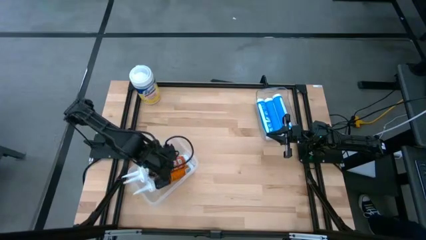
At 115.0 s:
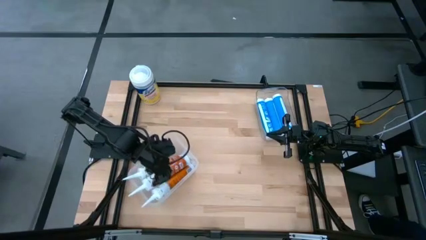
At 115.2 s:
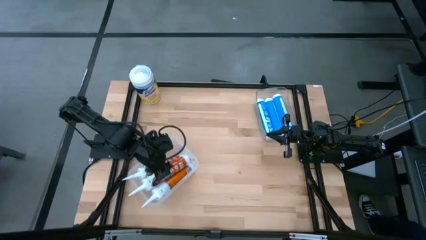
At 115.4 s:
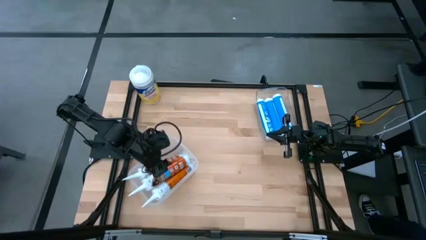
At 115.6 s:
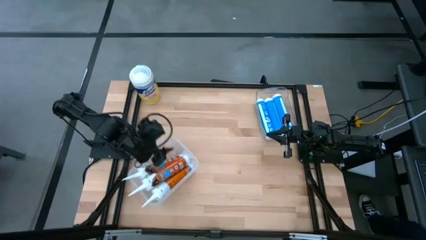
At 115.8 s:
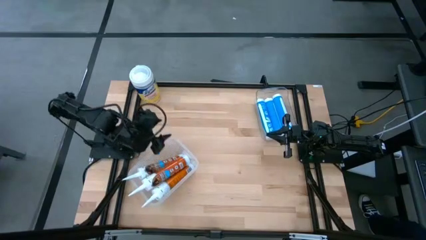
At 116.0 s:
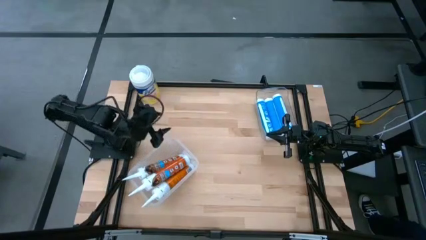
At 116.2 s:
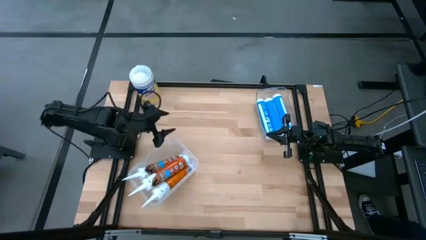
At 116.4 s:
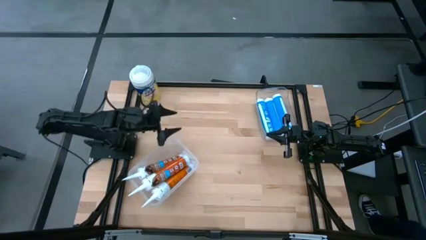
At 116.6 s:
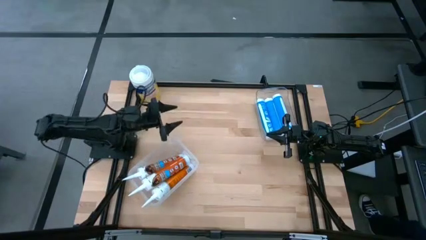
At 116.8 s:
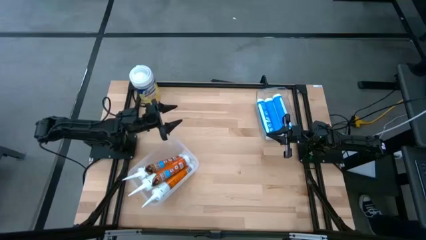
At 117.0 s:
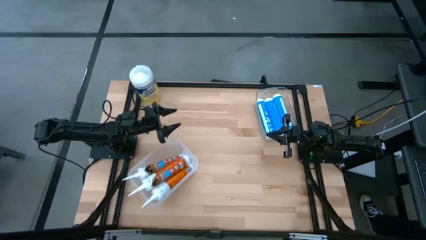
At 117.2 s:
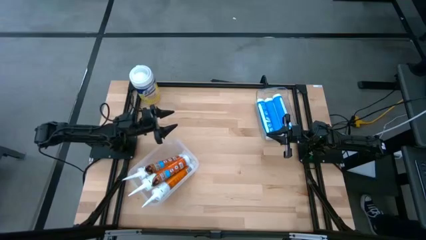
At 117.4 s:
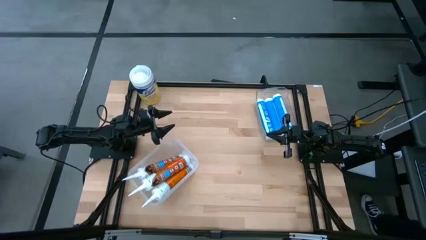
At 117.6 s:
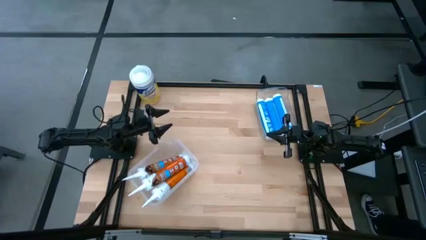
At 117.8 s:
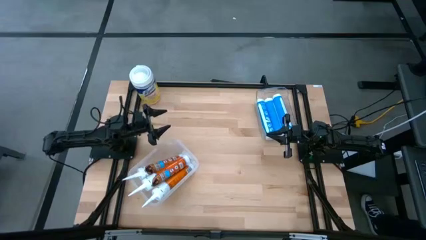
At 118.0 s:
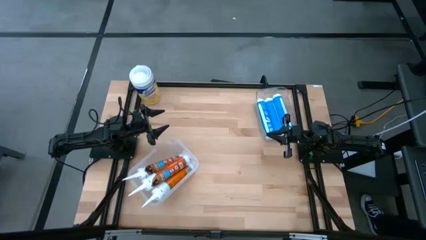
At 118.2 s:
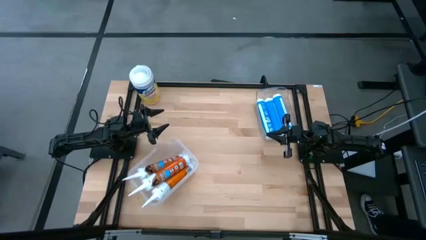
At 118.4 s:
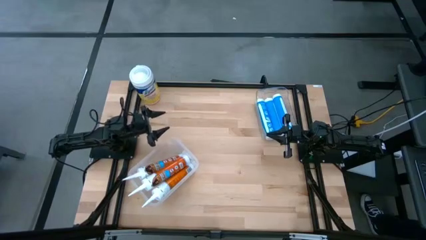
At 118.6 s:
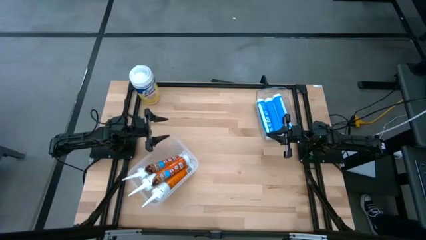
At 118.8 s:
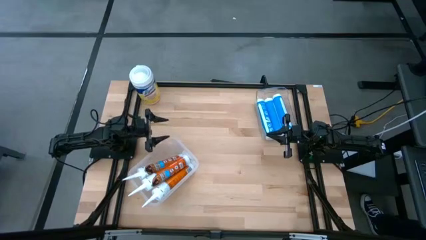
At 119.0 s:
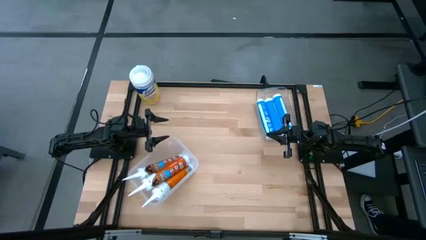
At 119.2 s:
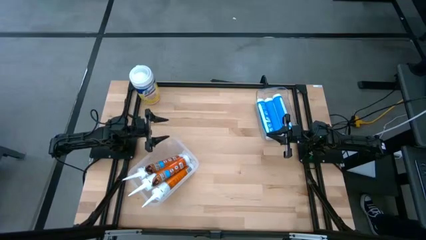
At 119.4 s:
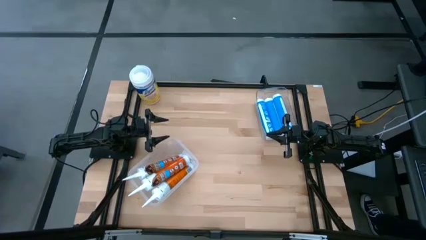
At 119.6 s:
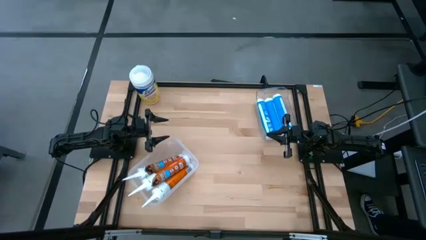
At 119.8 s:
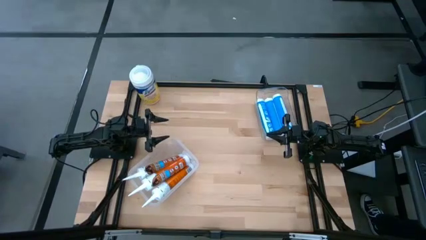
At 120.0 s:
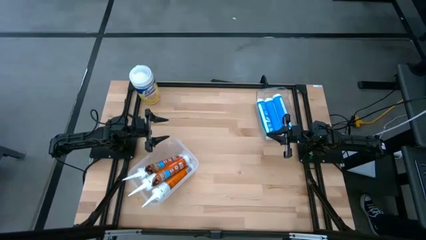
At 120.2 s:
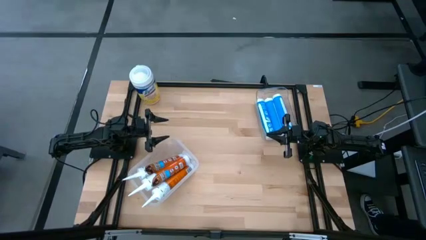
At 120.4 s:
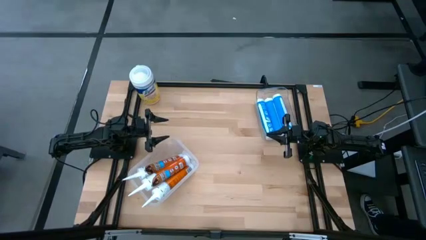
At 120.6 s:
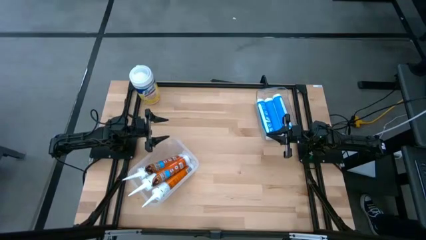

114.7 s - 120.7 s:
Task: Pick & place silicon tubes, Sealant and Lysol wipes
Return to Home Position

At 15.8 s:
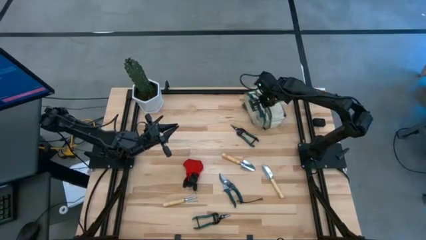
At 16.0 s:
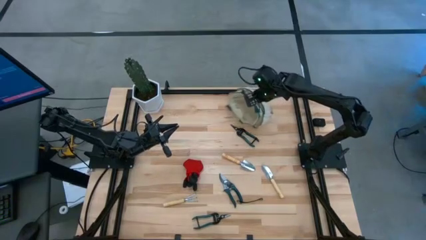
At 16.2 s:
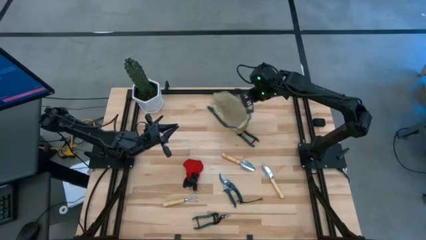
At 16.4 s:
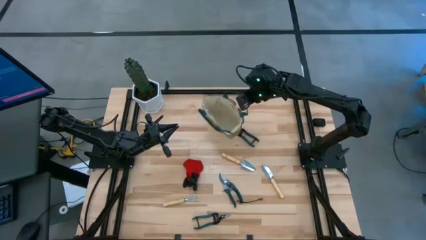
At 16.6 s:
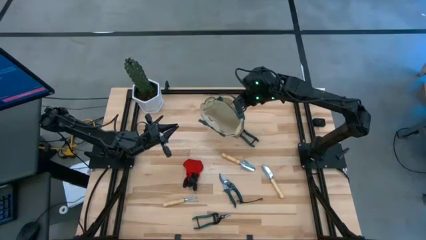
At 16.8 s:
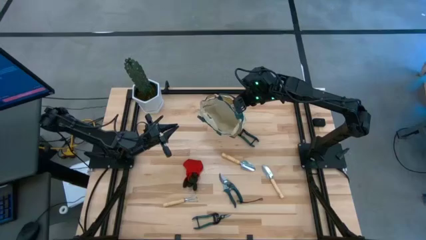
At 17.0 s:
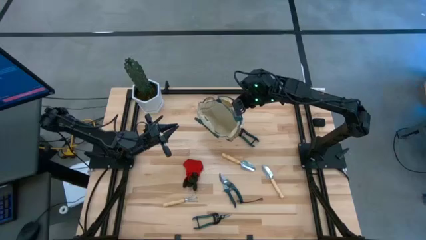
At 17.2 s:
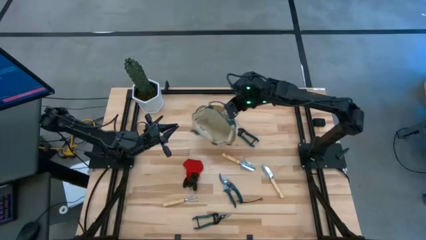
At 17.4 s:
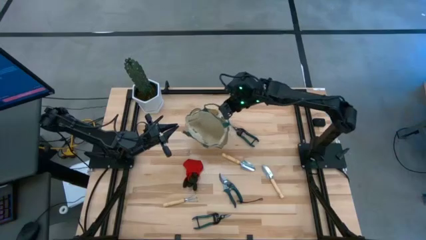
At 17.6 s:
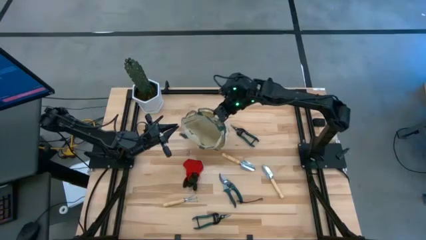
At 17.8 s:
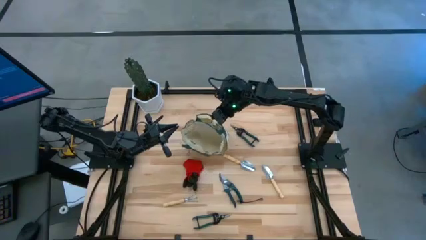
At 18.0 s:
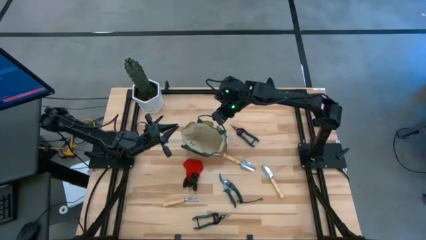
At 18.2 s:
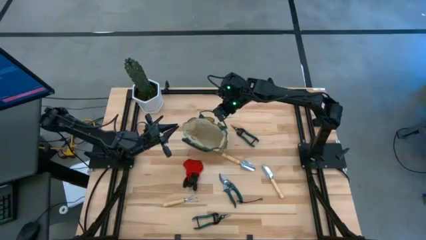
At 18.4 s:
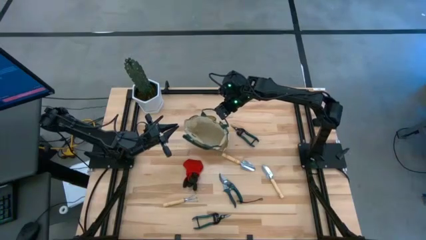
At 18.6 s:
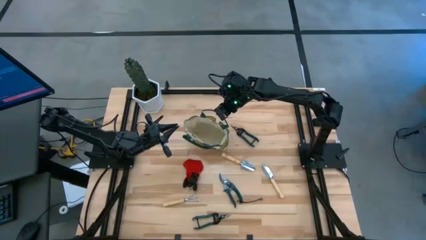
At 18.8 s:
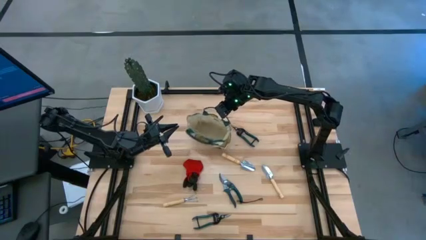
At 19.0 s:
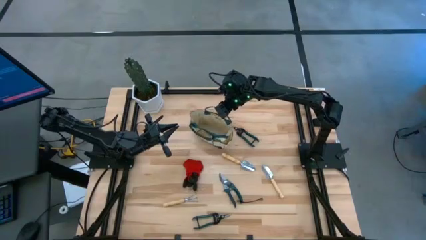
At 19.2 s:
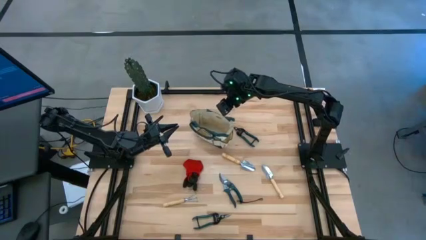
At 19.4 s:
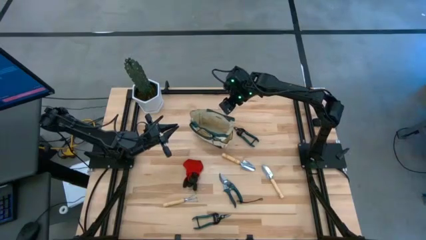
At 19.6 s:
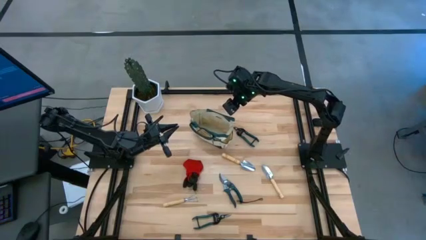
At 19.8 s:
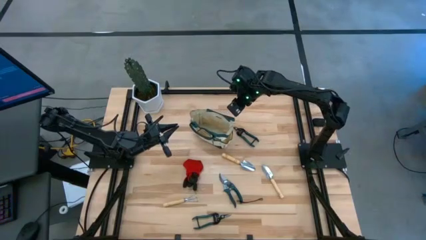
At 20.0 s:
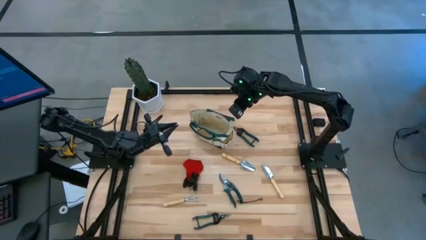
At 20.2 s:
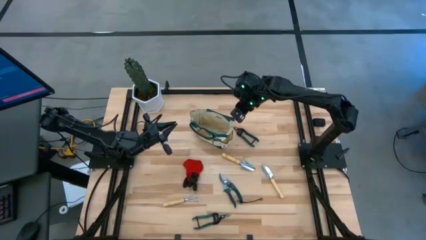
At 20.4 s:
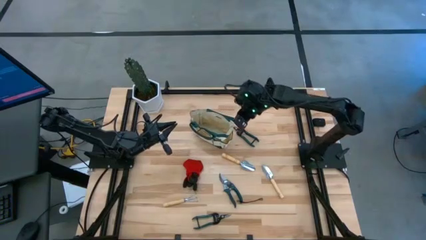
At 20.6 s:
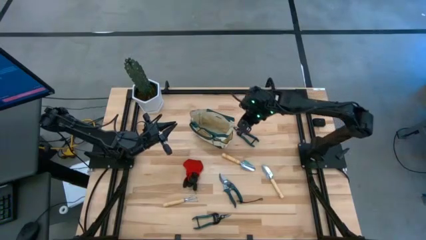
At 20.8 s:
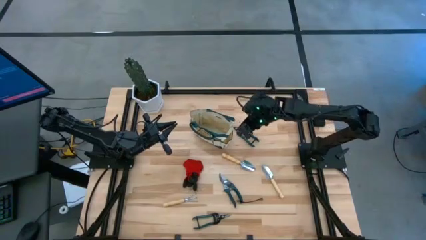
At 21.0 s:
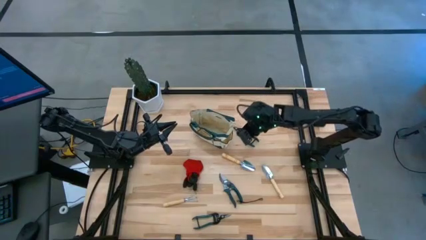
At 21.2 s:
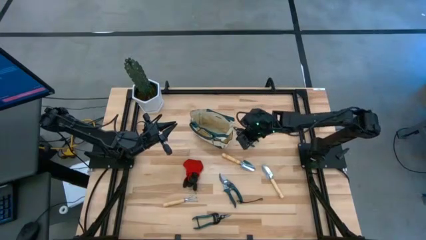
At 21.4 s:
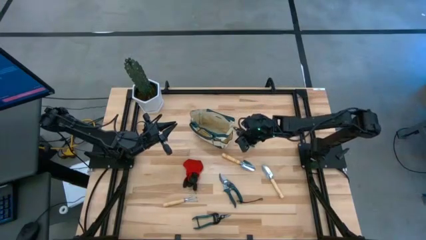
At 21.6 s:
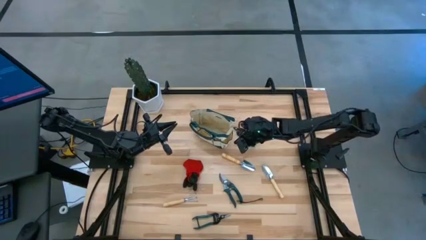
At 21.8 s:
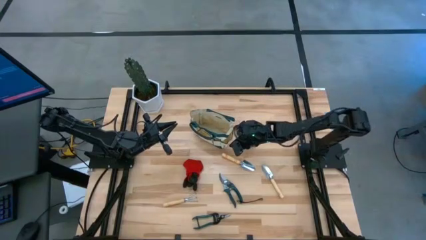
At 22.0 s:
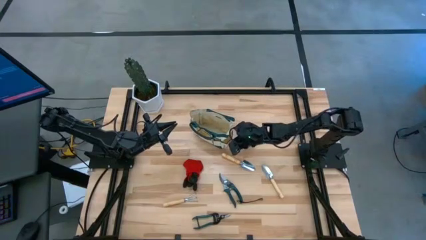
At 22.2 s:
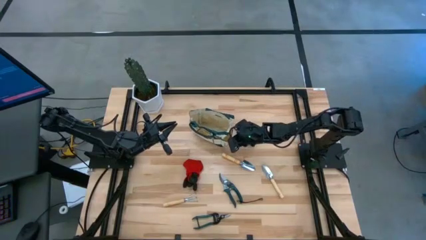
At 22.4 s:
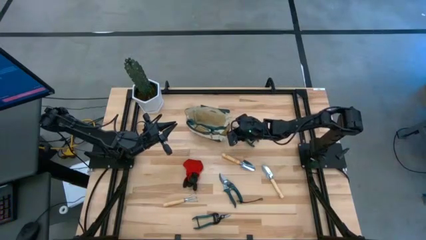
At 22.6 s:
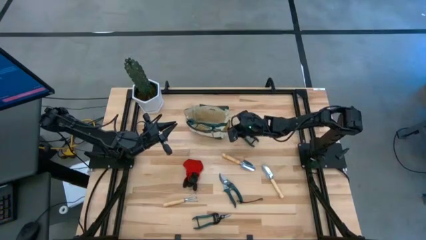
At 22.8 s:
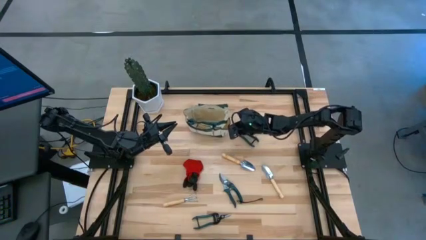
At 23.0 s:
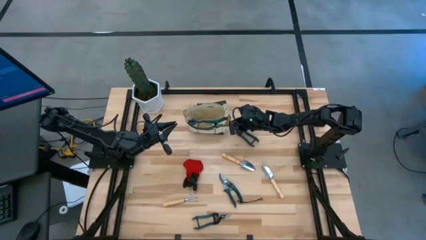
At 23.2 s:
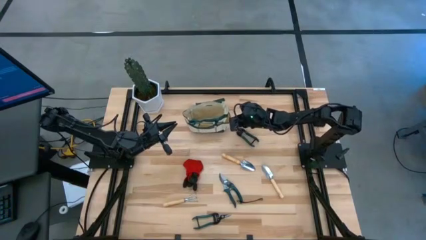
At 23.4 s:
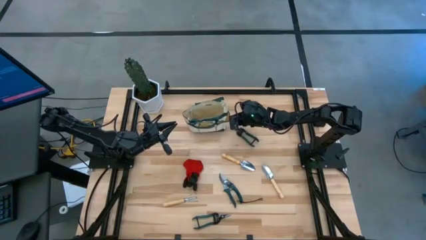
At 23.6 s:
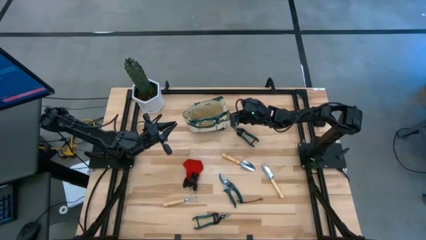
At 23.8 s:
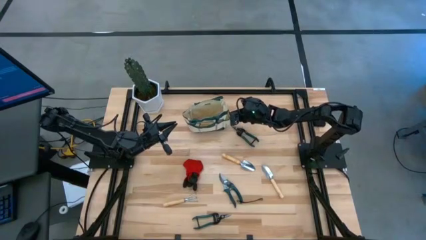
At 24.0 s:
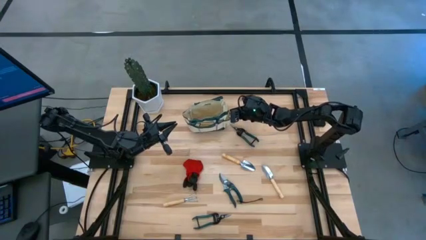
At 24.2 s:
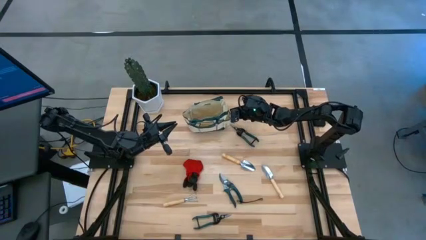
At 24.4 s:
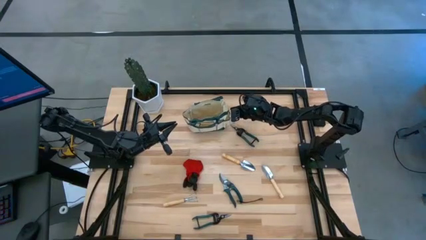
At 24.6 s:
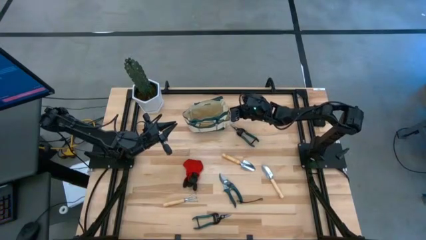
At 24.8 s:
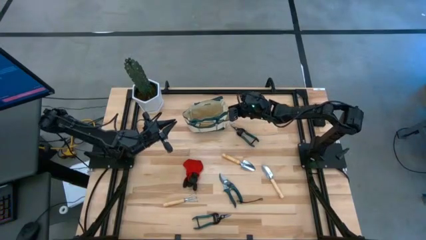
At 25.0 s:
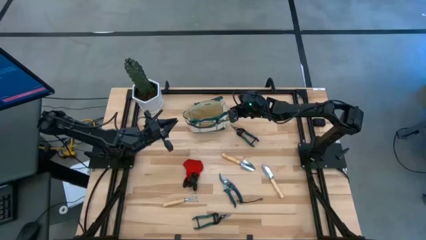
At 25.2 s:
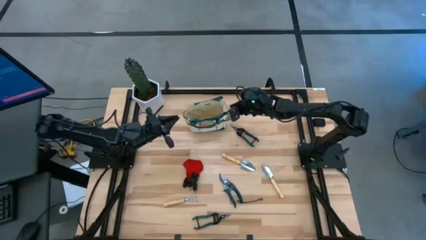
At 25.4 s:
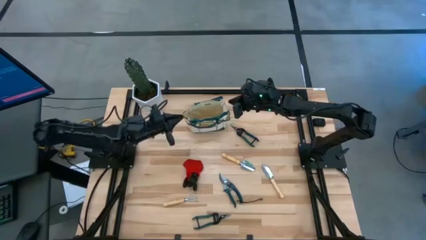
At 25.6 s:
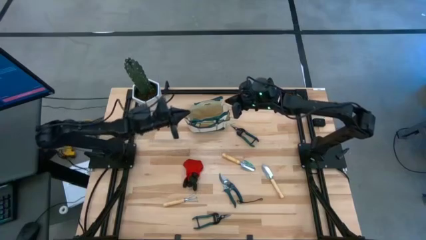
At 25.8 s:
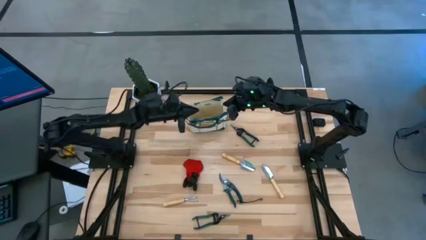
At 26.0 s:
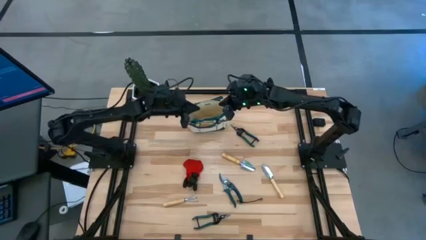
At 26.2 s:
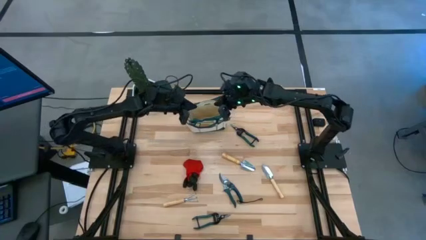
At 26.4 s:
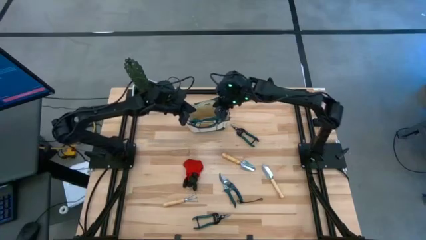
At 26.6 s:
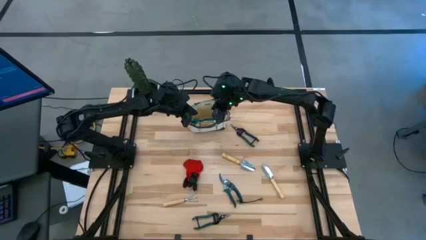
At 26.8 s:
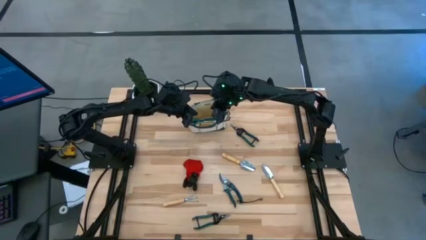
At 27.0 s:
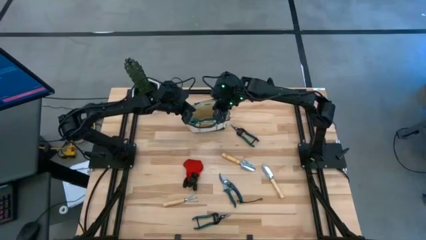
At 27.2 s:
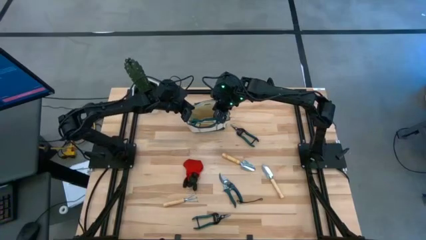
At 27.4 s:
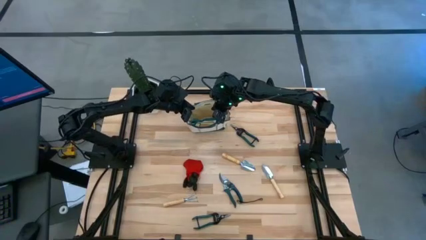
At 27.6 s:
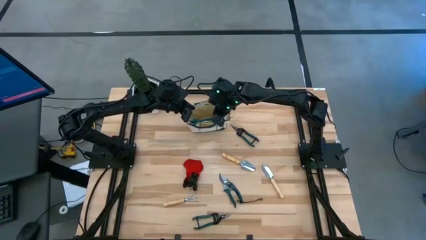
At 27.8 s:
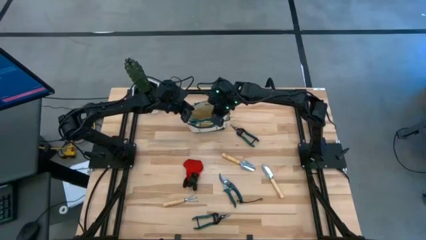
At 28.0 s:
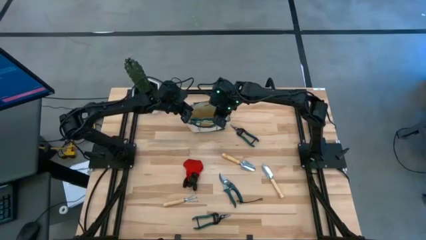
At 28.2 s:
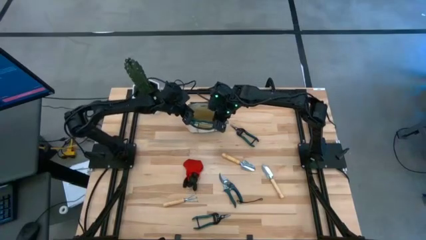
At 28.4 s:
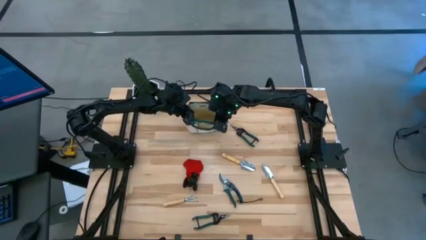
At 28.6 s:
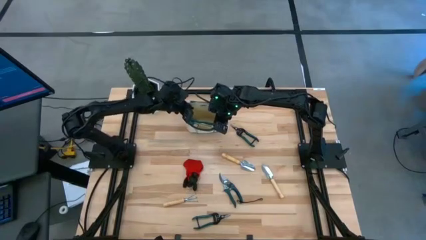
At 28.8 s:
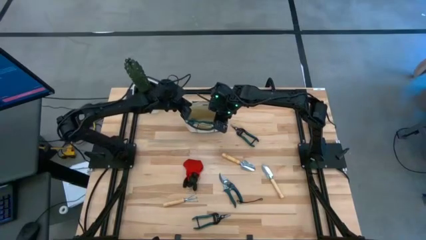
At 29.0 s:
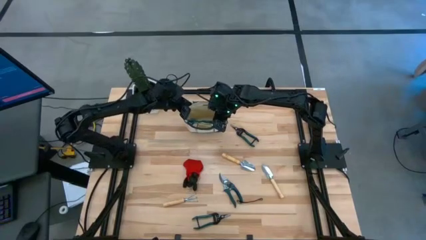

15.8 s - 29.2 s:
Task: Pick & Place Garden tools in Gardening bag
Move the gardening bag to the top middle of the table
